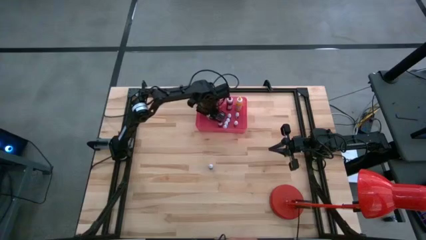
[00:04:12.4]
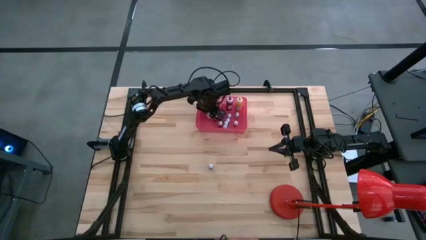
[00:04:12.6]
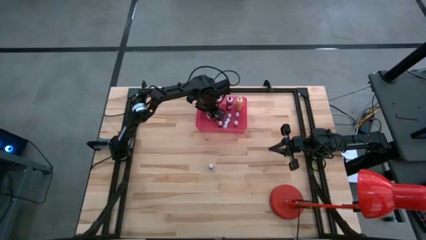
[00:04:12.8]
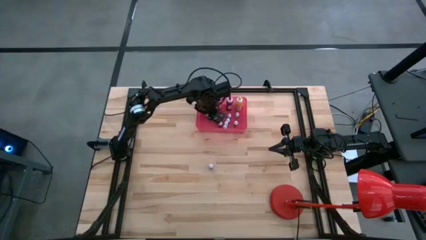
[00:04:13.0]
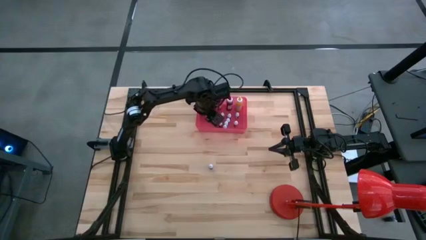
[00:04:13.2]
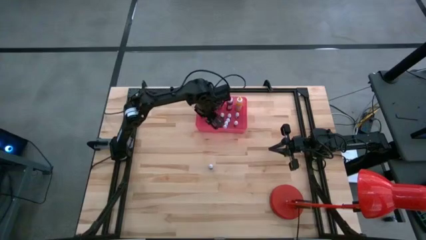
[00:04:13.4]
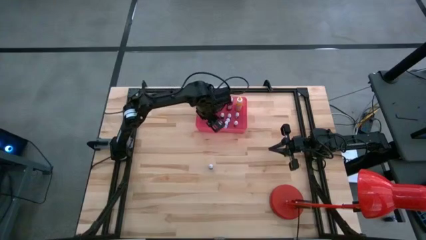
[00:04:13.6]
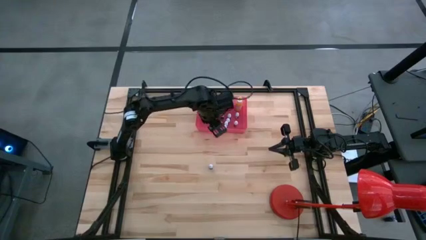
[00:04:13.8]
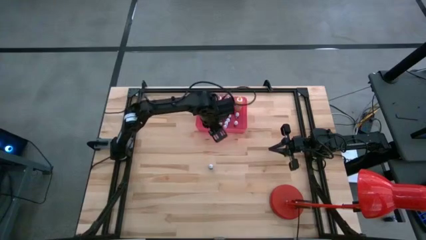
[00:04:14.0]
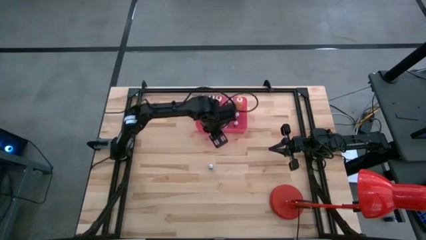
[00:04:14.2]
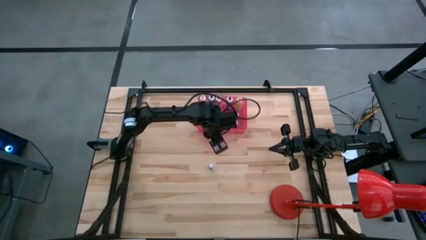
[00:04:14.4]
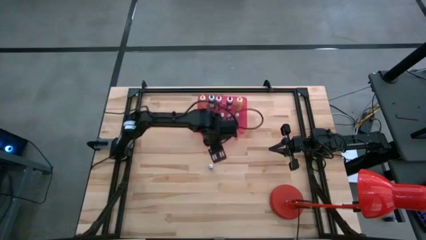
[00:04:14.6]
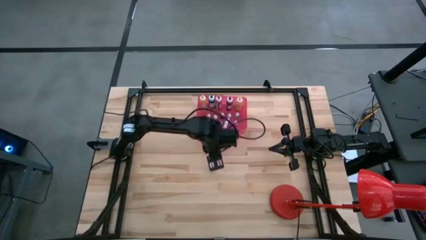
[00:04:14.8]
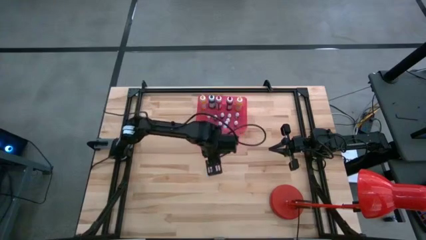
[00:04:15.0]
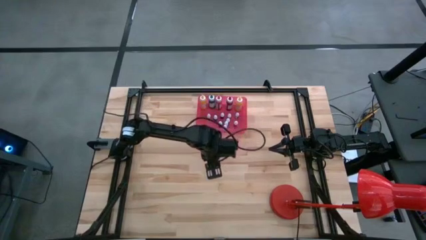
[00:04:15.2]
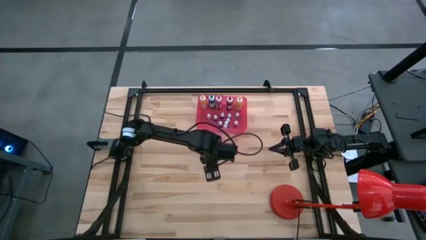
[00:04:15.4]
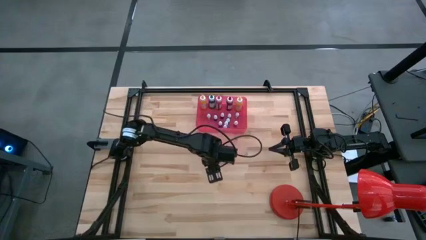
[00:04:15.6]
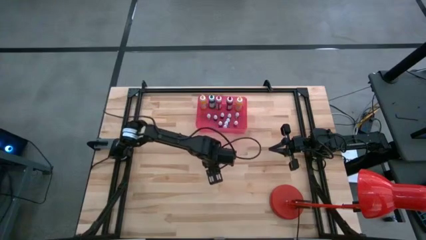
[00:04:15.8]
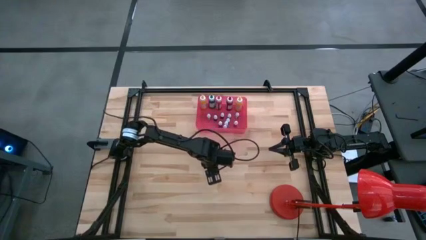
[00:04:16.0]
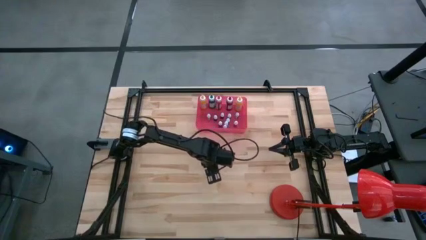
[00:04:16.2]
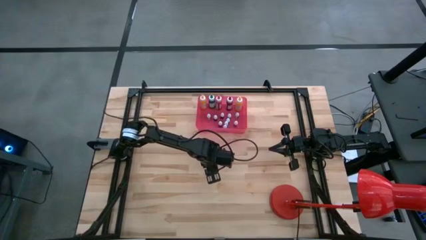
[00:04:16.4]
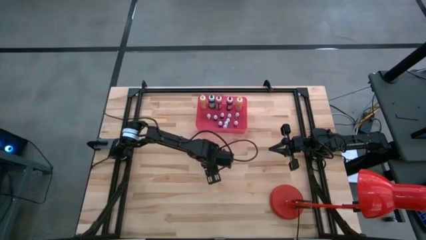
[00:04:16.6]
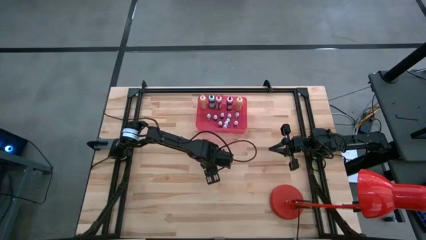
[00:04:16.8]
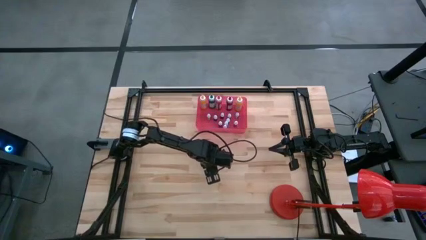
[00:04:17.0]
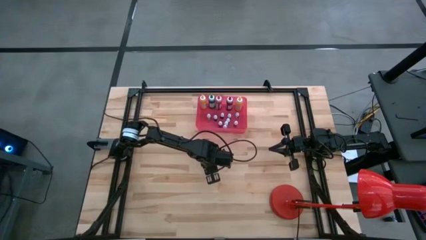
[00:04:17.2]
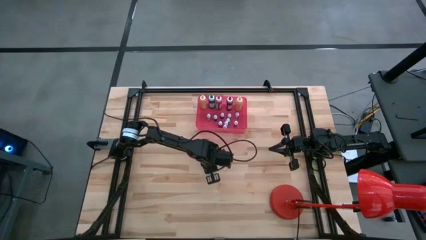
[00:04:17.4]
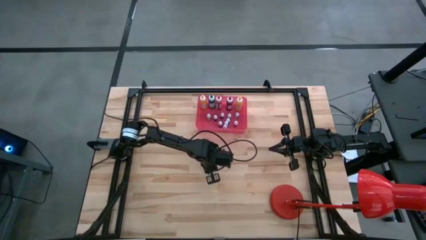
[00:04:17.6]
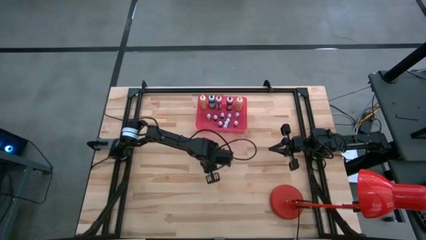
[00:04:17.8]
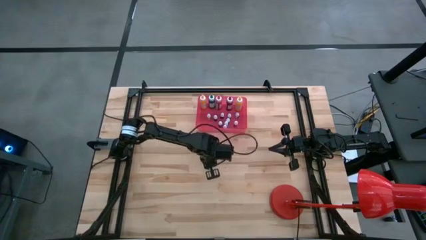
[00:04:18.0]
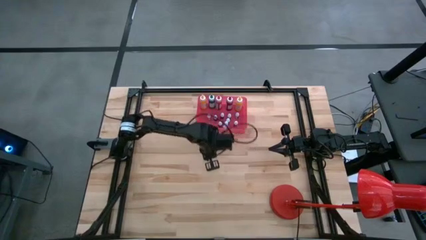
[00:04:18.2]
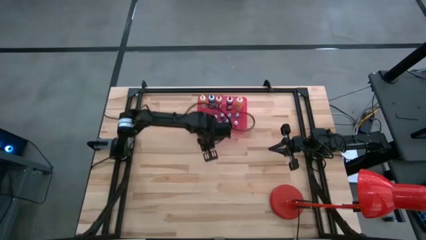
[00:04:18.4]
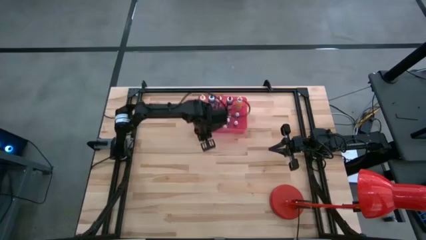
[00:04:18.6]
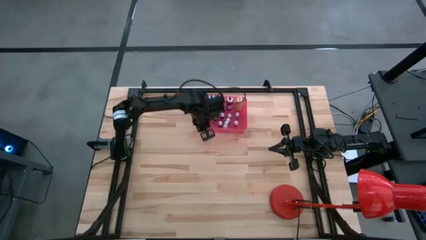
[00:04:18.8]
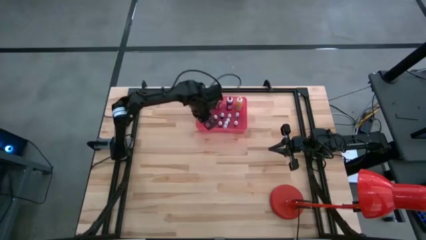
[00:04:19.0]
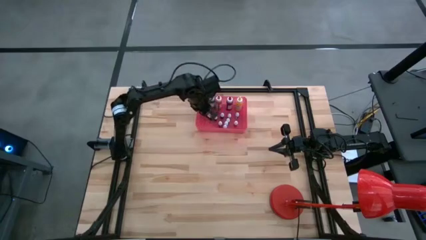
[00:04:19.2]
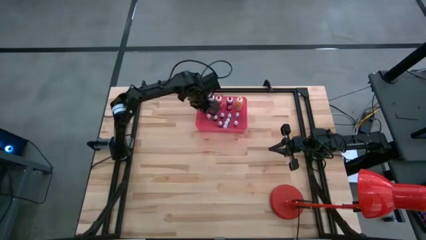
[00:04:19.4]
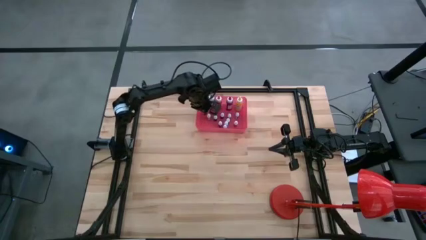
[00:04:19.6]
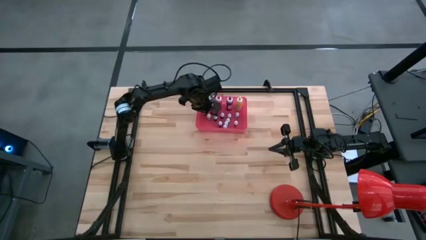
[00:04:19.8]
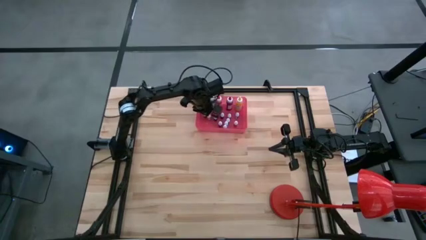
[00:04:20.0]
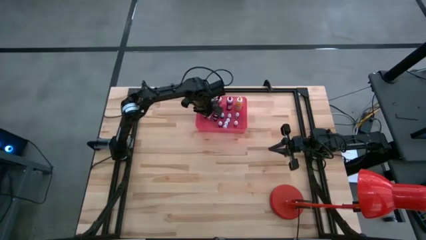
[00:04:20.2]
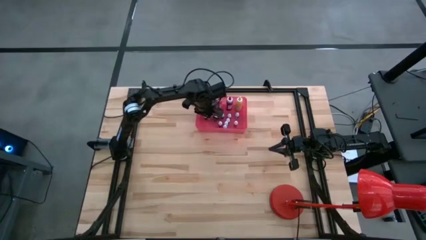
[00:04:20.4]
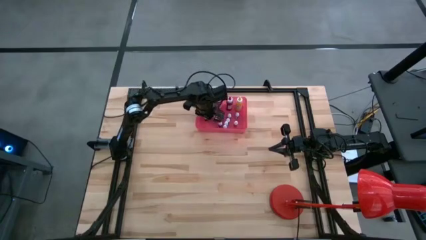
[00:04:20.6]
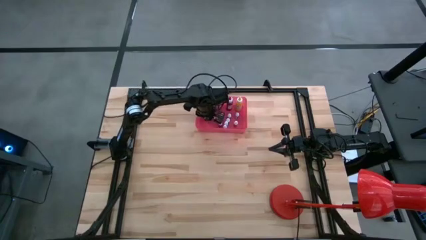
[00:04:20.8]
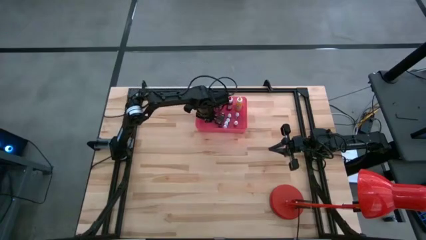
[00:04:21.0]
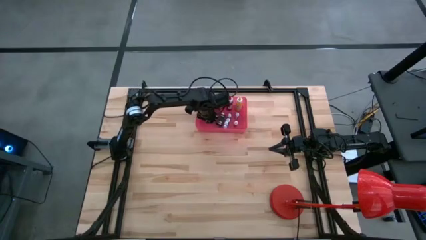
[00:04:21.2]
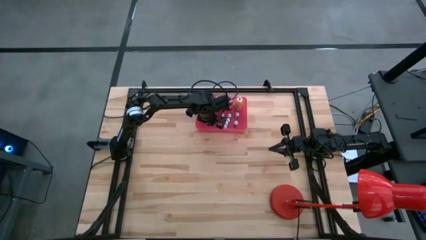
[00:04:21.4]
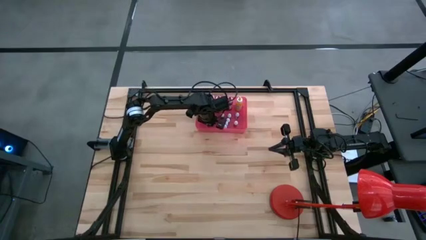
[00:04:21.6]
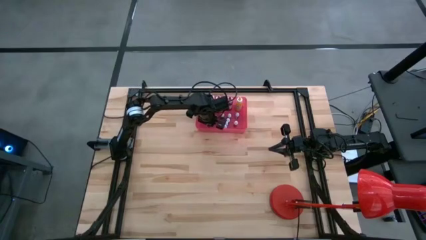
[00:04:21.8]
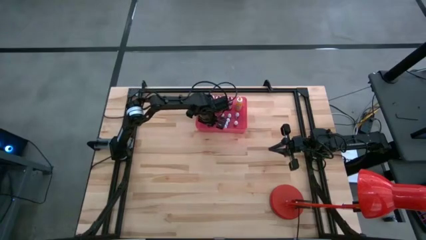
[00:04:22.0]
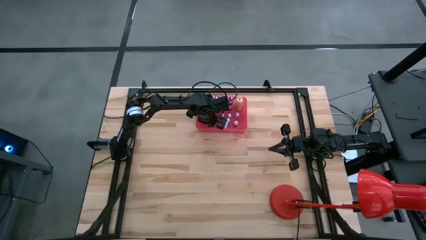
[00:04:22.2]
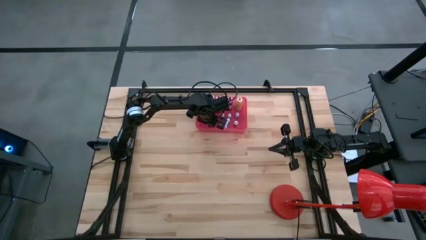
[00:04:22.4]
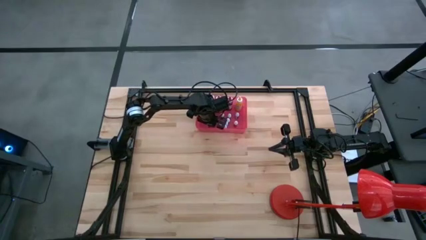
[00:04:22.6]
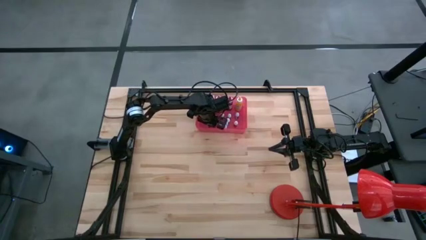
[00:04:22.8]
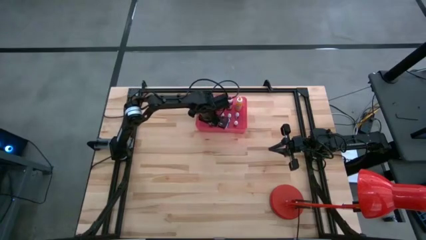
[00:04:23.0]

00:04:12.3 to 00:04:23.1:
Task: Pick & Place food coloring
Put the small black food coloring bottle into the pink bin

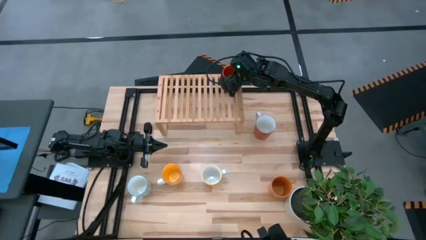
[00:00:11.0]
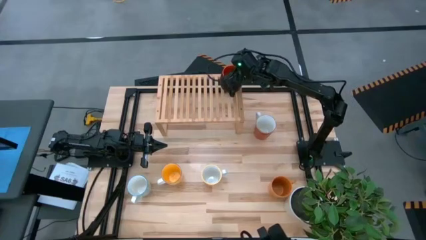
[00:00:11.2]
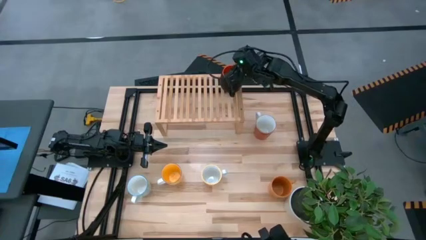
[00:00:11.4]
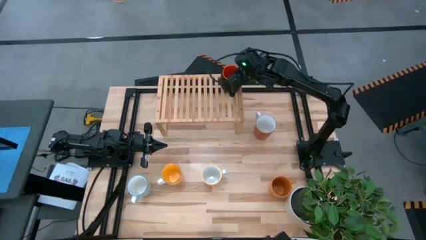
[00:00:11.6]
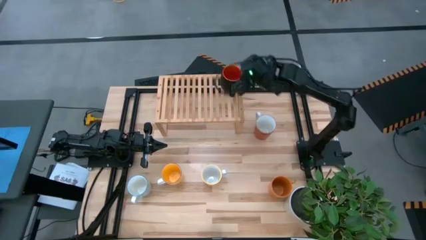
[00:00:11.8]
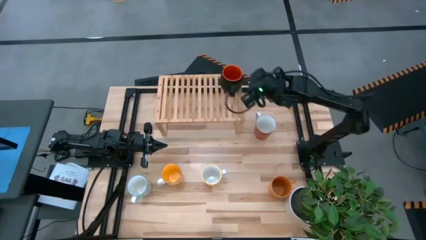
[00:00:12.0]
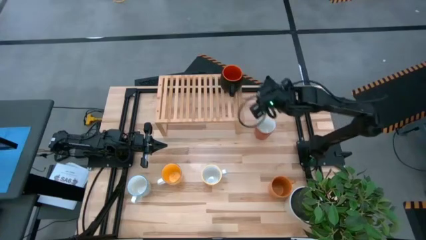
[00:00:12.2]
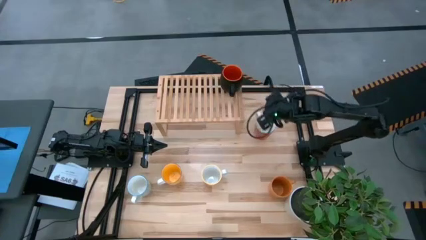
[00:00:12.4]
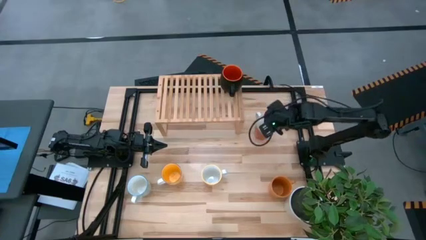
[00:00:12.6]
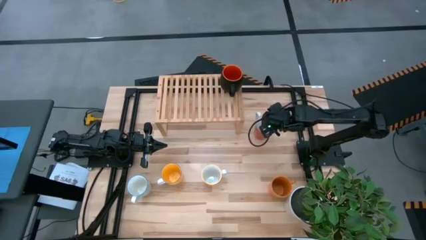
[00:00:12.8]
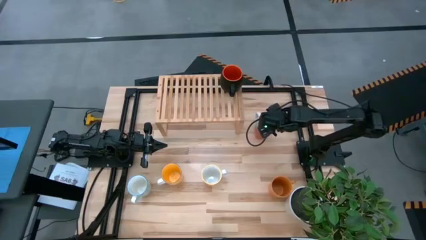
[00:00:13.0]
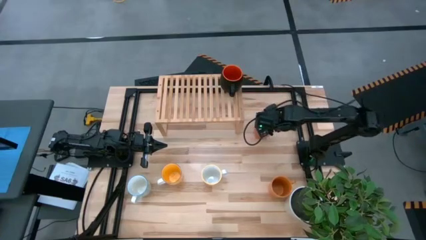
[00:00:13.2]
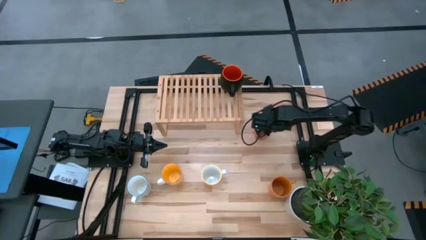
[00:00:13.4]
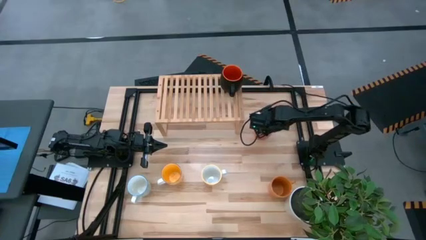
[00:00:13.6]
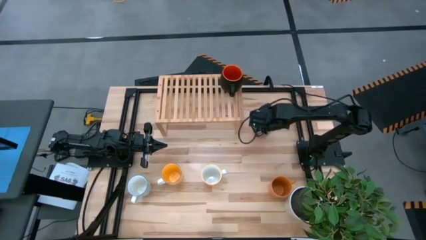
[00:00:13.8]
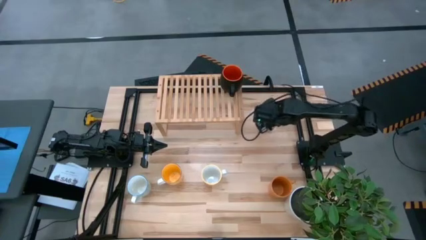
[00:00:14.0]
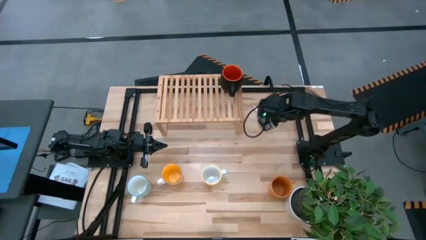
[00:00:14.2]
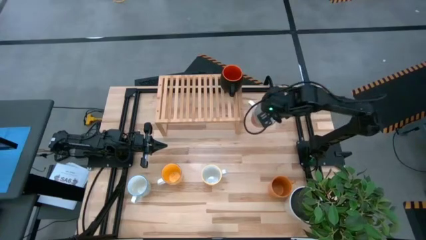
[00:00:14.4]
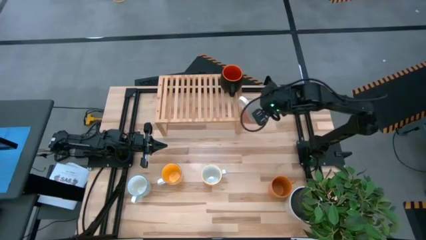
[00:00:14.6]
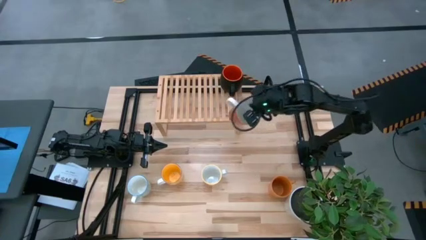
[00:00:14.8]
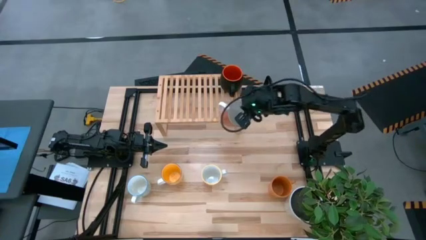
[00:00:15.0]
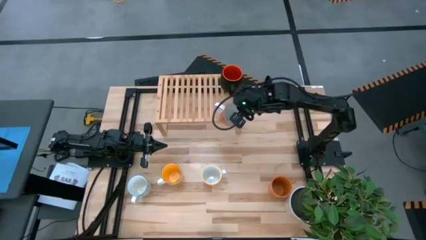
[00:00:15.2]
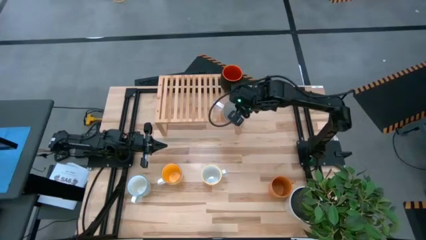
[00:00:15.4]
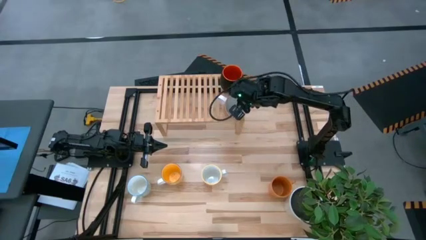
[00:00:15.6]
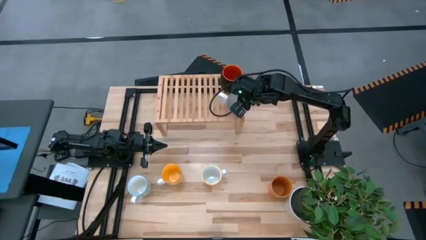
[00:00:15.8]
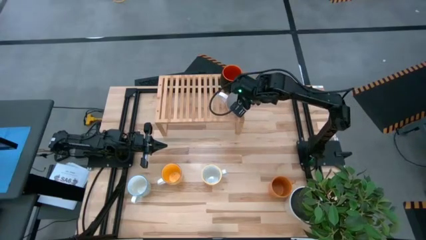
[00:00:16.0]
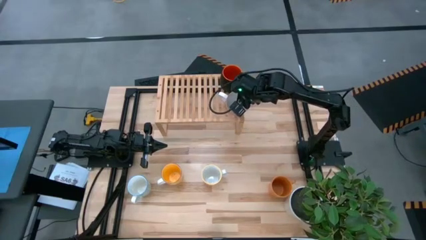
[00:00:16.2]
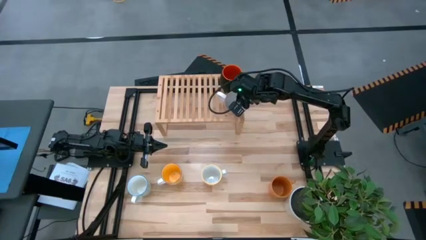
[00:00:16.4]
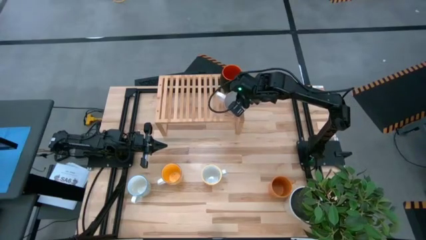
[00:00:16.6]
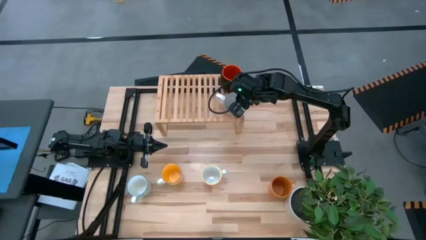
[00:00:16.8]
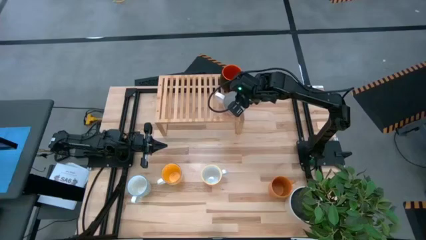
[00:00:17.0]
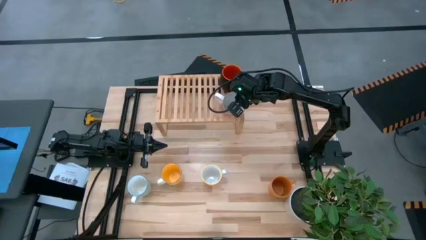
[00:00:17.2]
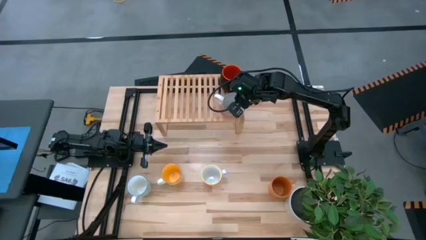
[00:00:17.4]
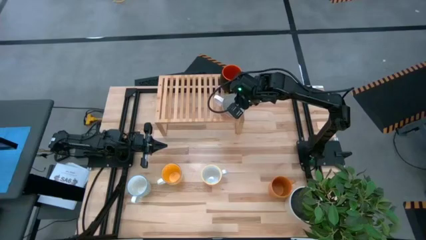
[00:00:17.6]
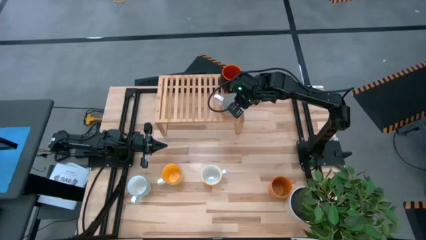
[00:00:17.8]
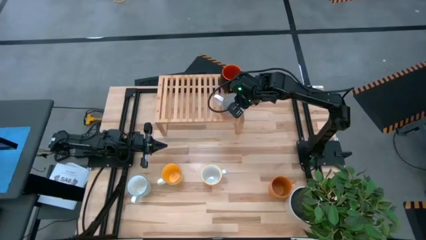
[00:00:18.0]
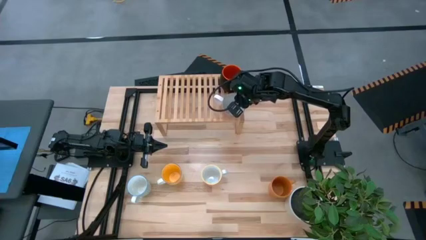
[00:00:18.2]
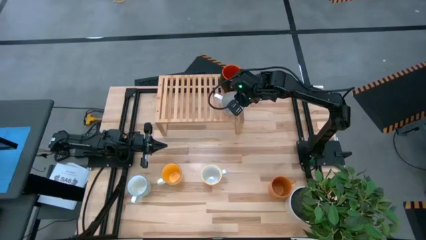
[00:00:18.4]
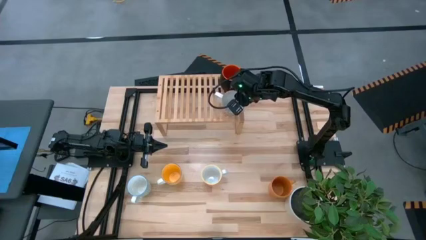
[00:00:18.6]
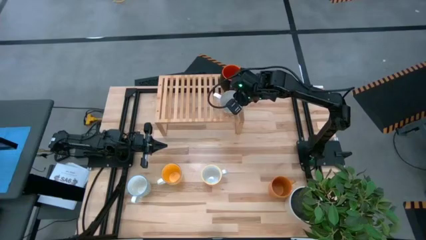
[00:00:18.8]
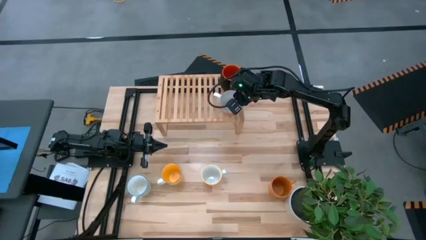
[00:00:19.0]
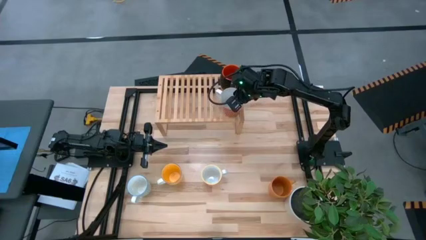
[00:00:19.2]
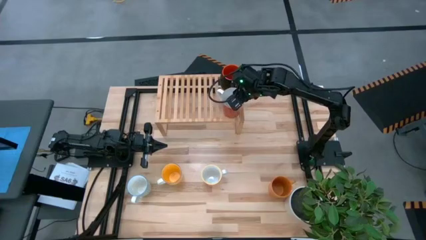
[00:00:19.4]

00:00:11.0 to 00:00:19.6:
Task: Place coffee mugs
Put the orange mug on the shelf
